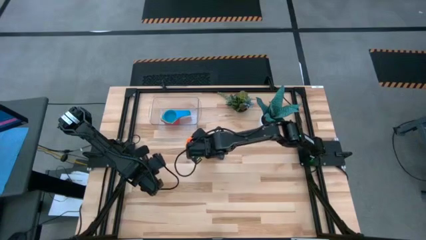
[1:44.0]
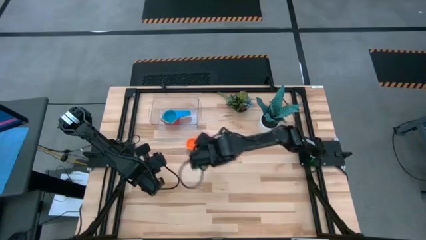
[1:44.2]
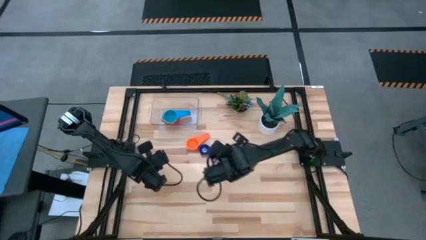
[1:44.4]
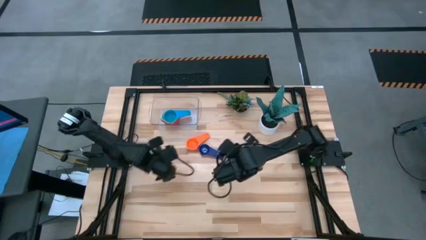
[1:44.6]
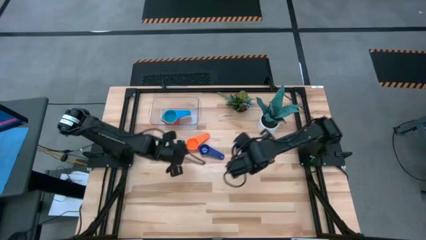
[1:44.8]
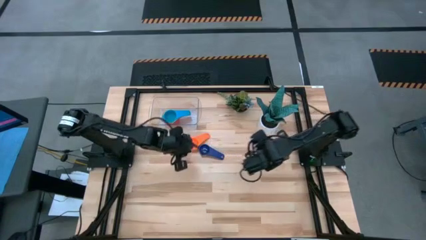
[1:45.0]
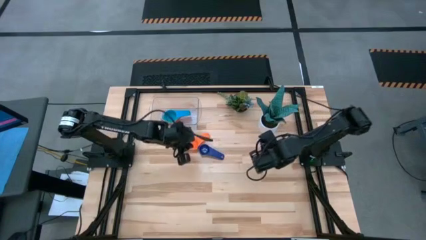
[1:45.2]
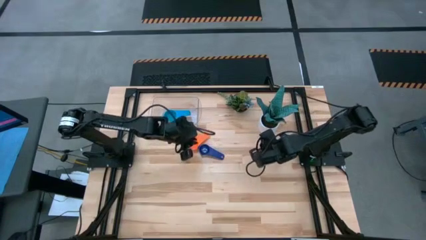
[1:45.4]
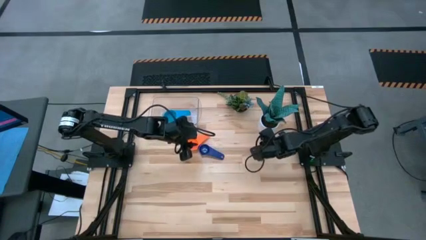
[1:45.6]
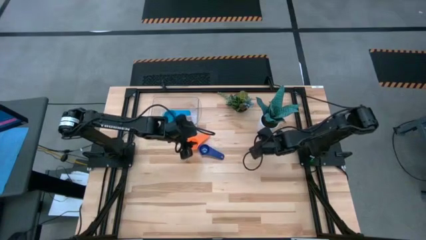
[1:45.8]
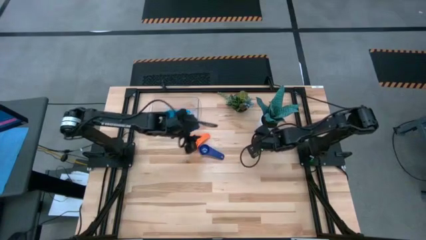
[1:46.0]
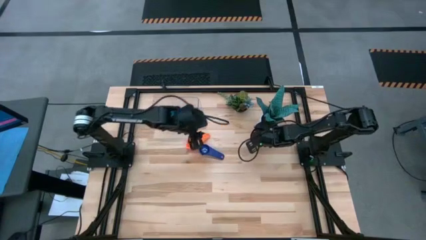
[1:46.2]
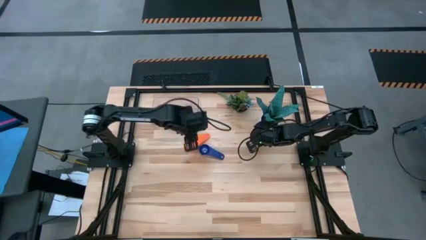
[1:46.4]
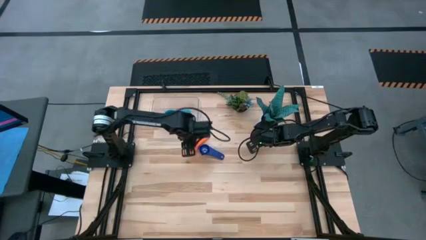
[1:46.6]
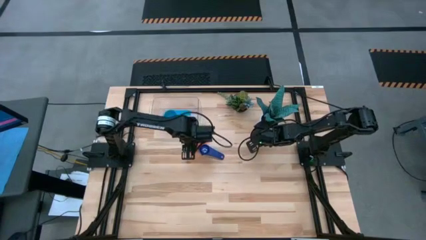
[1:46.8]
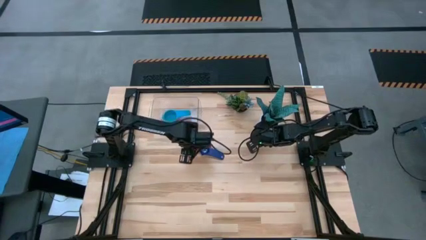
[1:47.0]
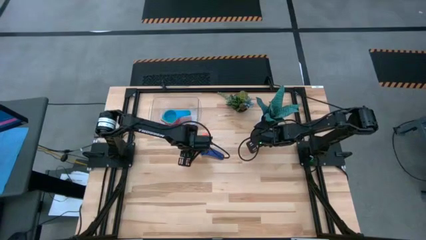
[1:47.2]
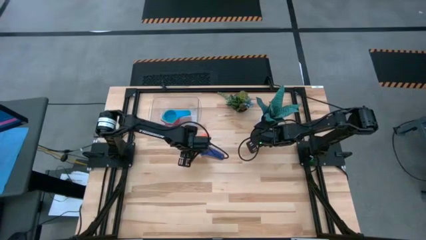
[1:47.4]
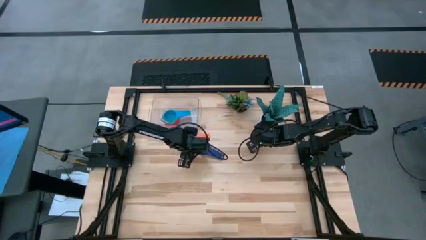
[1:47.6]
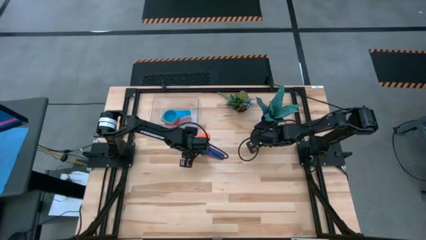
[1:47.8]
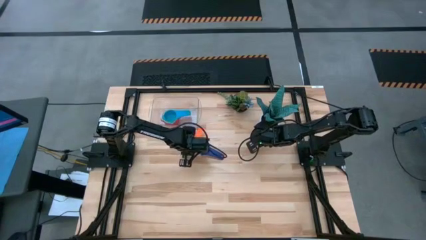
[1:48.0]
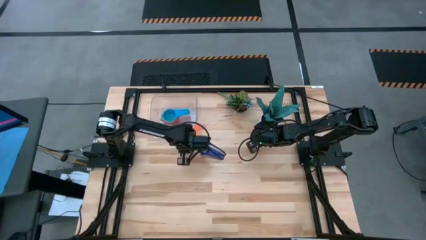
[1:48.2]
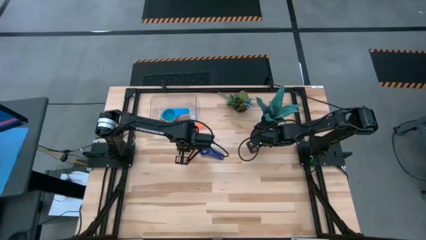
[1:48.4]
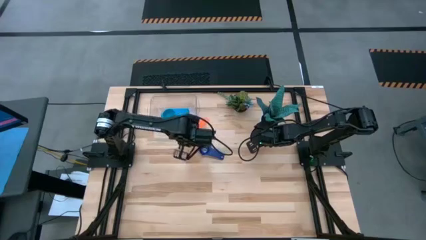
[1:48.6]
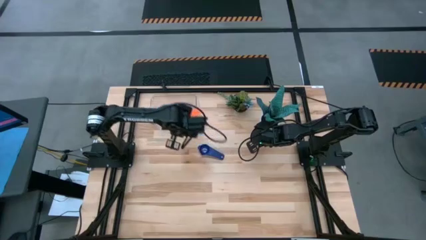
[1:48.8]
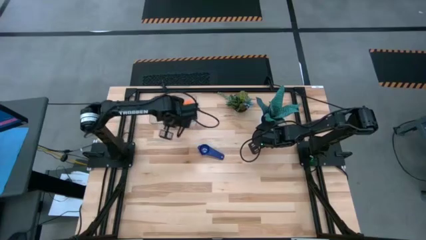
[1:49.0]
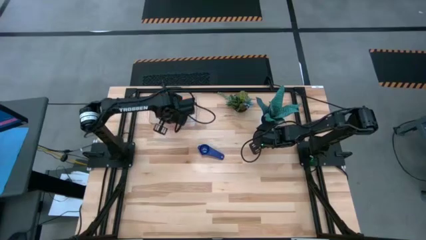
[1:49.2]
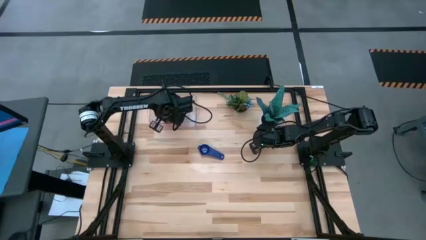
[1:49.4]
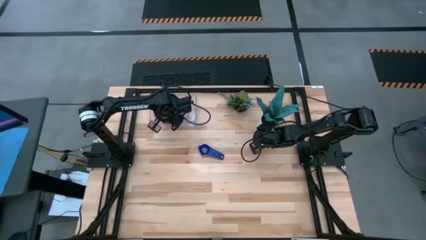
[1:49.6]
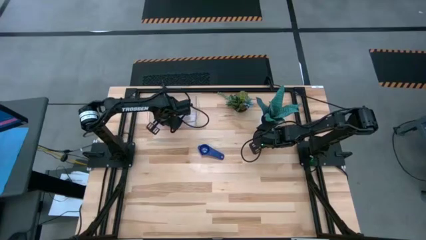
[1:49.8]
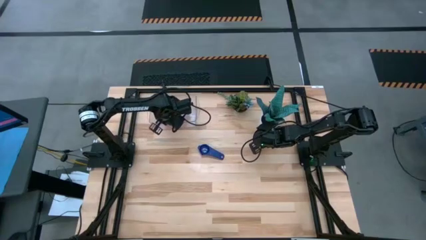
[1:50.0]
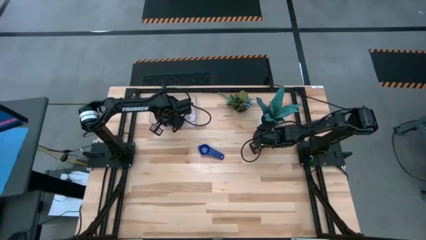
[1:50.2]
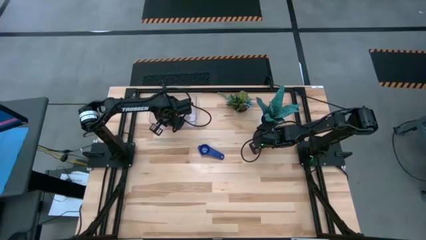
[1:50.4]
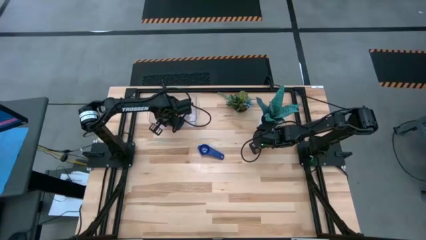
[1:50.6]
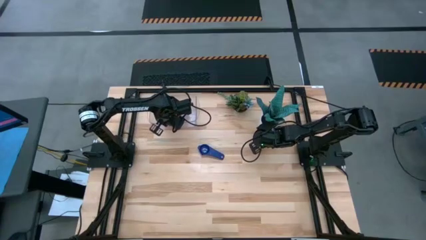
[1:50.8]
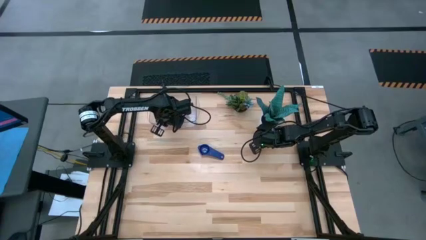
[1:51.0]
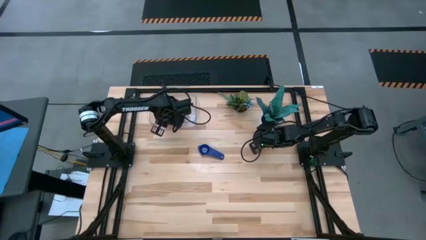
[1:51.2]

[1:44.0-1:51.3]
Task: Nest measuring cups in basket
Stack the orange measuring cup on top of the light blue measuring cup in the transparent bin

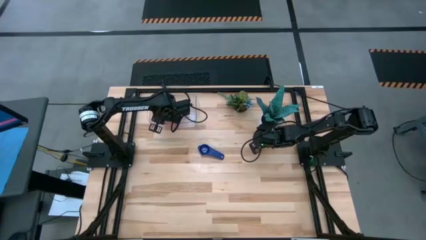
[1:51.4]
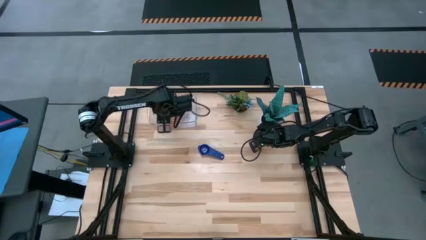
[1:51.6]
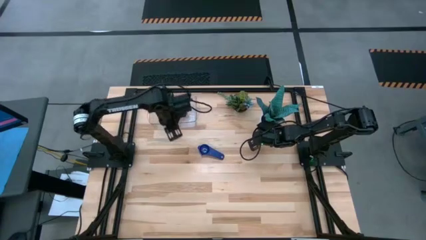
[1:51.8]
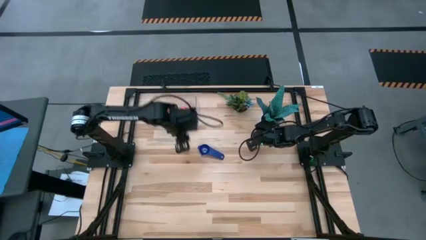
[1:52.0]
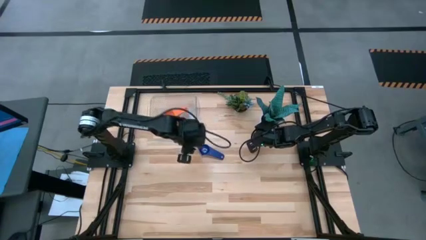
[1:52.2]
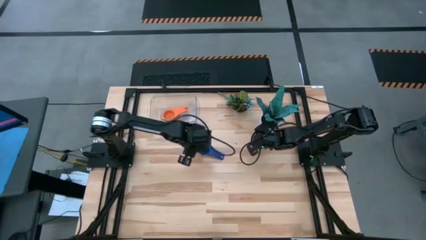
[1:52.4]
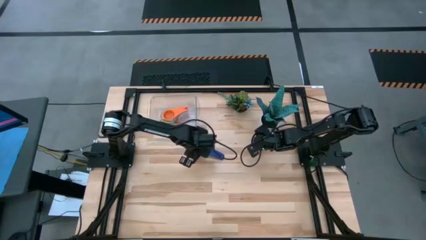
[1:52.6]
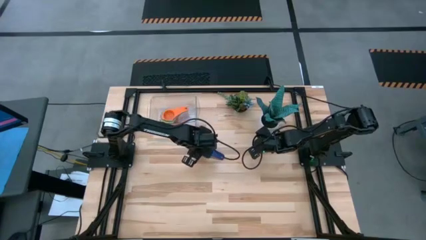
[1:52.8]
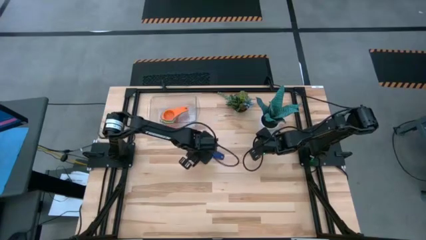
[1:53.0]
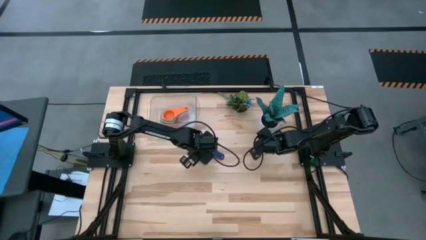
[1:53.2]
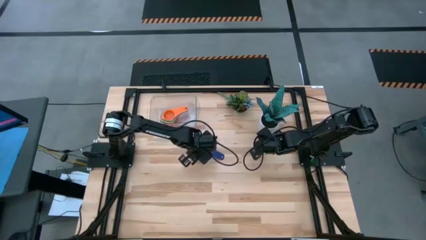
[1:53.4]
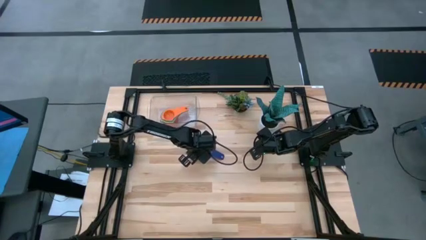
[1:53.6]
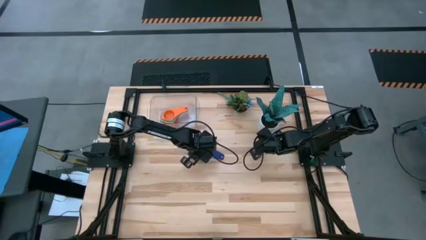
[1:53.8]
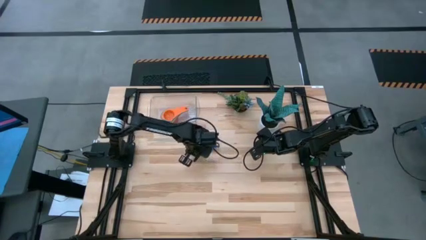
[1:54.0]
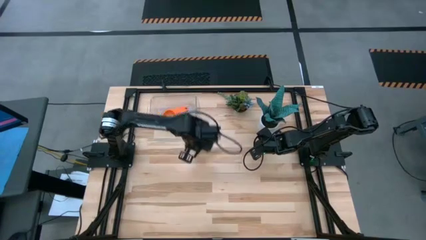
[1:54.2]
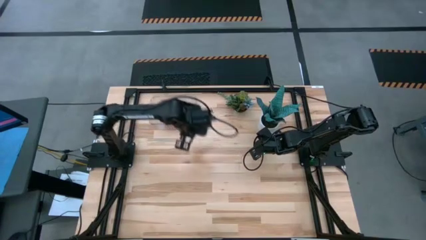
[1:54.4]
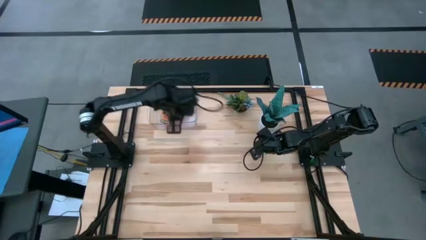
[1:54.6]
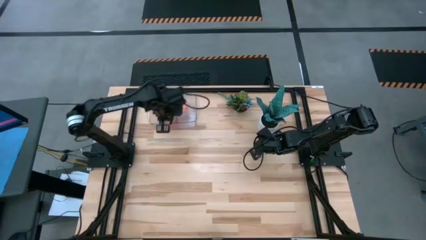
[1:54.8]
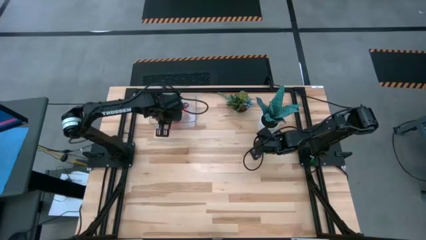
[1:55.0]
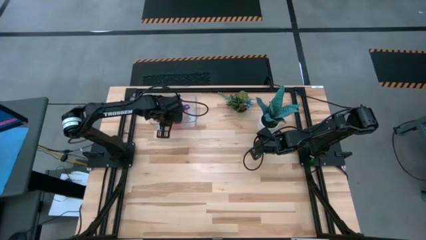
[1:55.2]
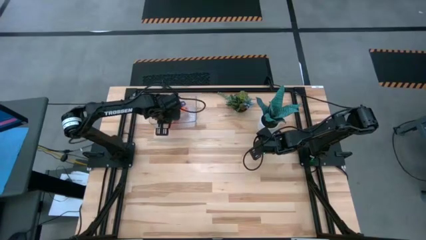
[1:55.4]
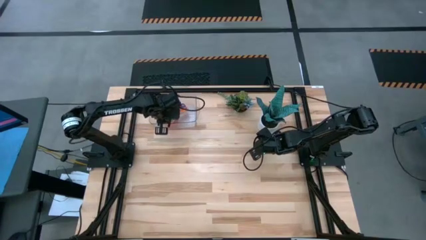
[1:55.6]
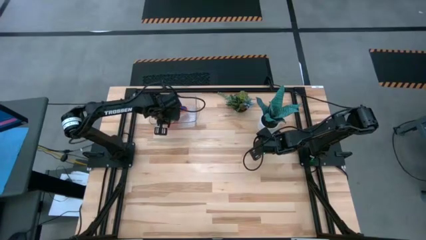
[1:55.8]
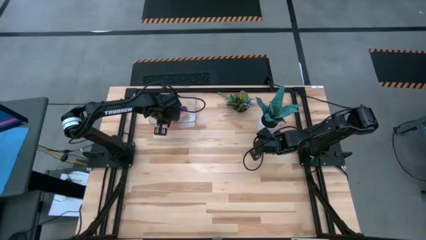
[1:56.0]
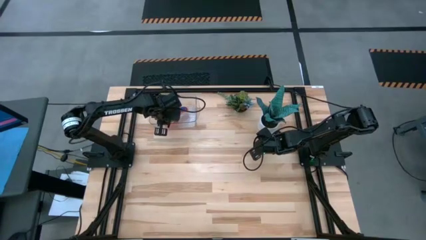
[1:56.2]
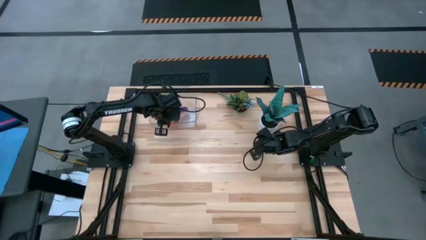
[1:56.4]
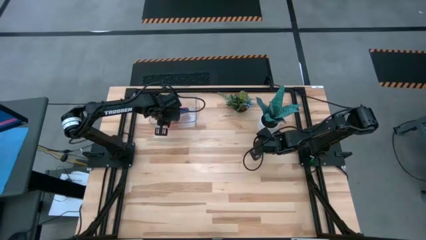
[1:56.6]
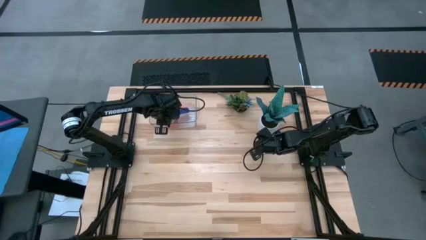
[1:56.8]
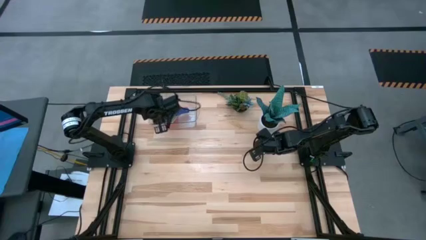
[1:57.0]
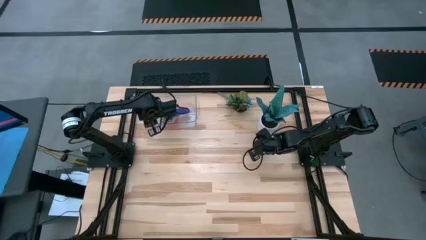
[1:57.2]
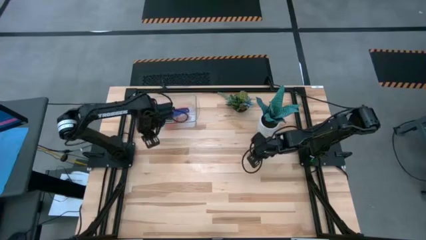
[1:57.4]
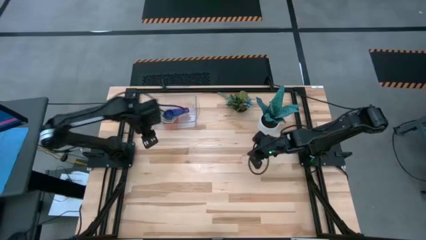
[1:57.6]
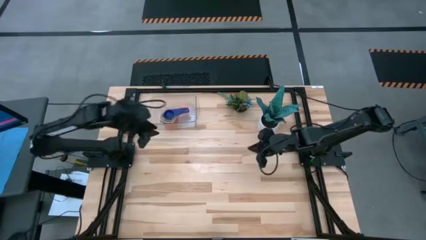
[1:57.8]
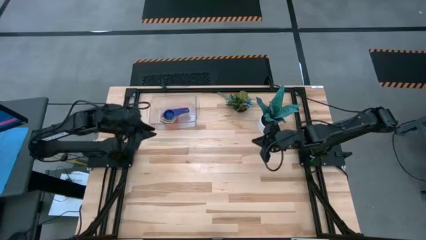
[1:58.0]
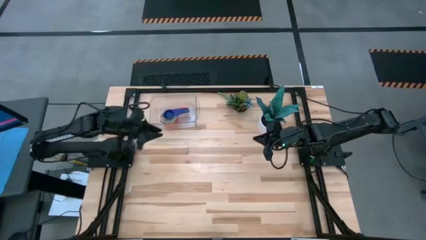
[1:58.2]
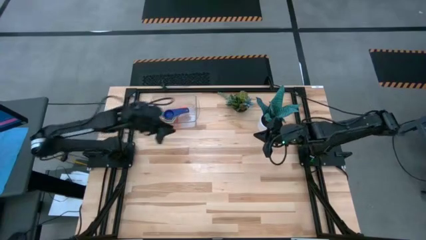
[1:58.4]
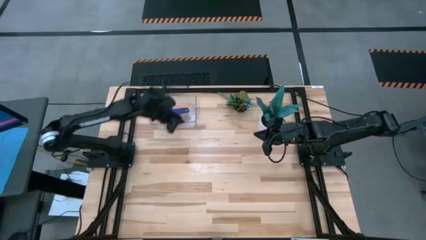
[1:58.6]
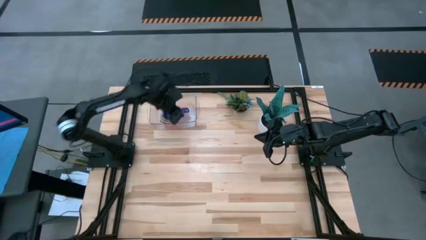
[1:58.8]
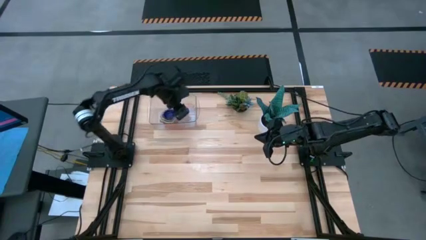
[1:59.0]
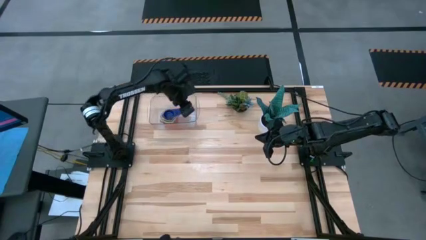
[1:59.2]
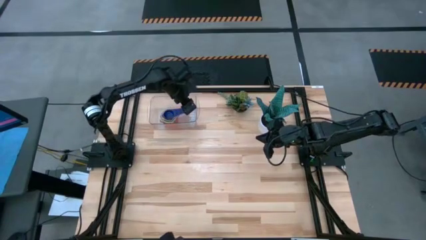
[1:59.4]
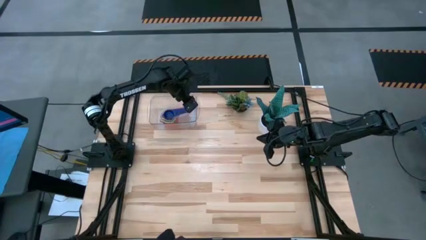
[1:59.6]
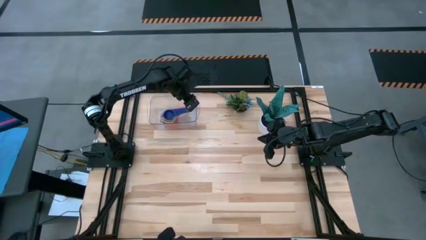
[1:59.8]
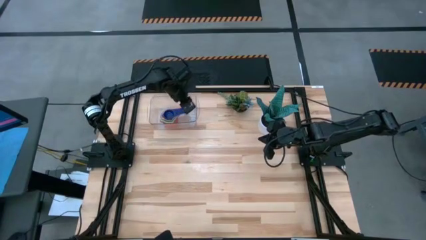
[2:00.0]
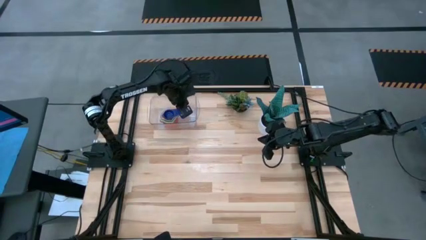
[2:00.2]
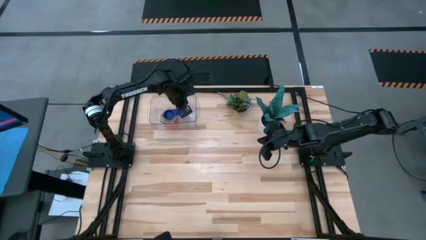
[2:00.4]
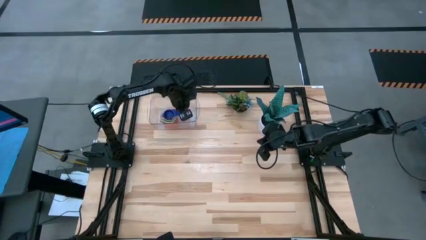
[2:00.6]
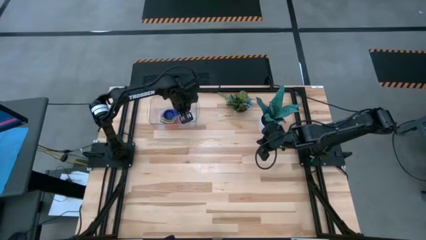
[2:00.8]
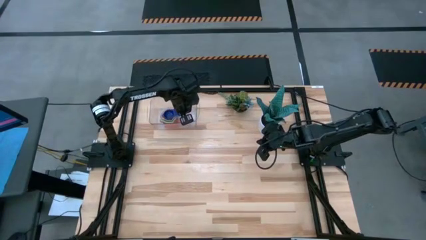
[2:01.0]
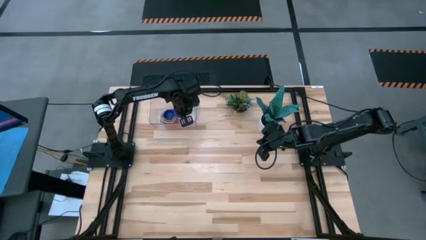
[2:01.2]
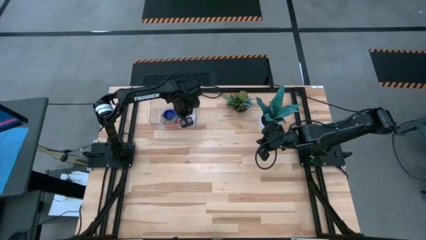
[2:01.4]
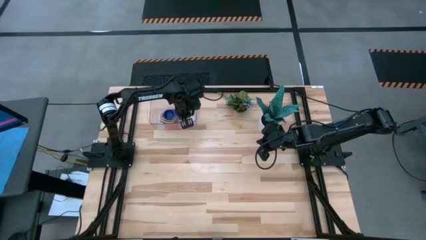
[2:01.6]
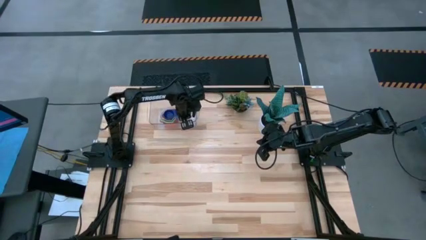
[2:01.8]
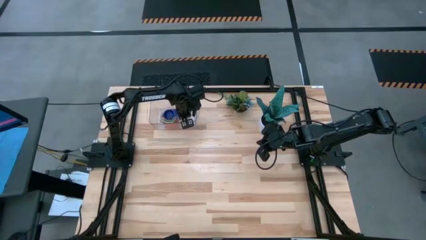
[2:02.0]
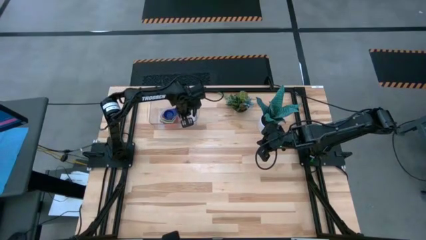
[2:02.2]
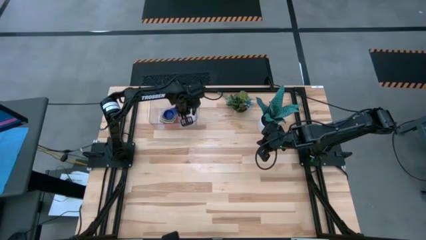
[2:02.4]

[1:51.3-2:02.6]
Stack the dark blue measuring cup on top of the orange measuring cup into the white transparent bin
